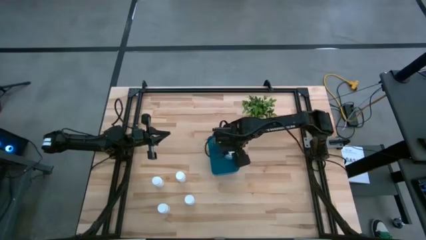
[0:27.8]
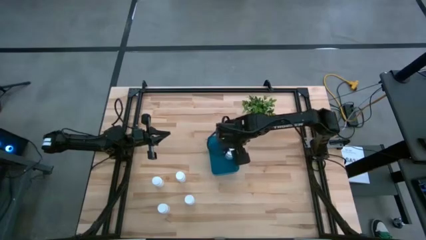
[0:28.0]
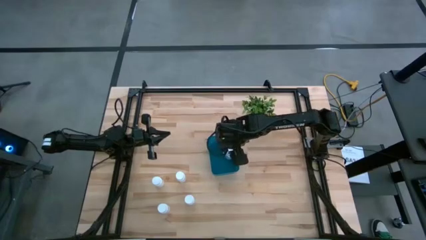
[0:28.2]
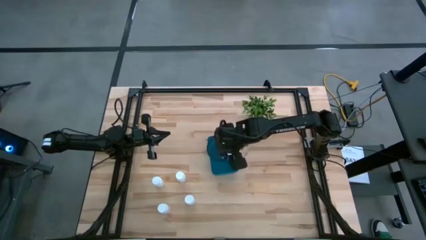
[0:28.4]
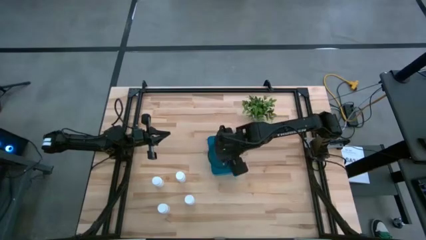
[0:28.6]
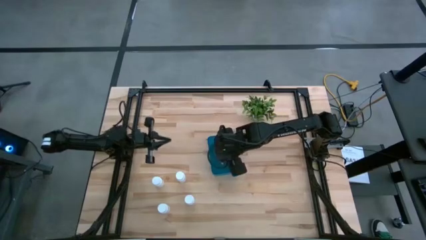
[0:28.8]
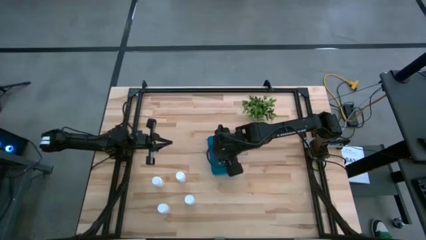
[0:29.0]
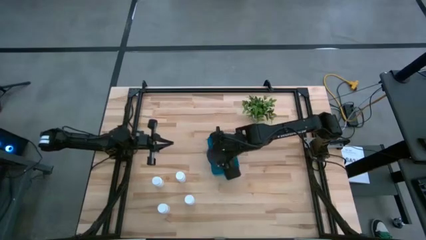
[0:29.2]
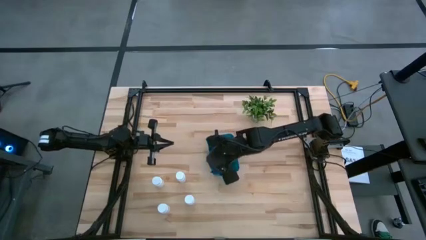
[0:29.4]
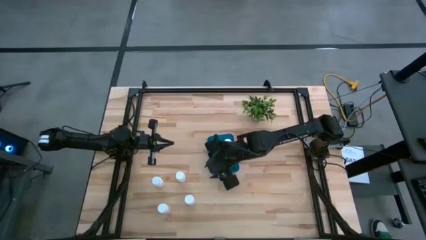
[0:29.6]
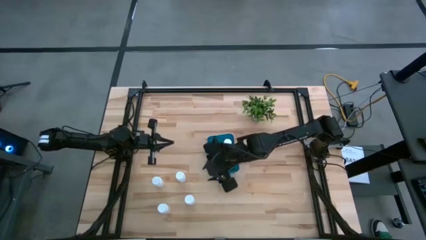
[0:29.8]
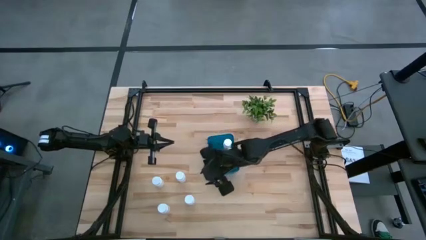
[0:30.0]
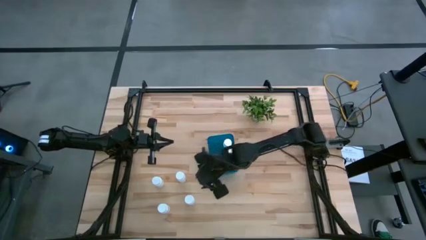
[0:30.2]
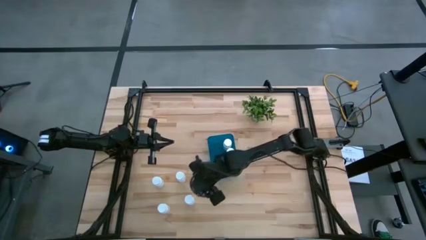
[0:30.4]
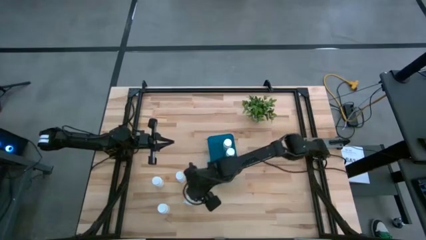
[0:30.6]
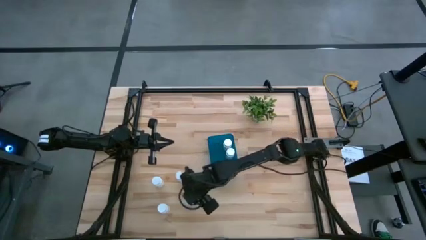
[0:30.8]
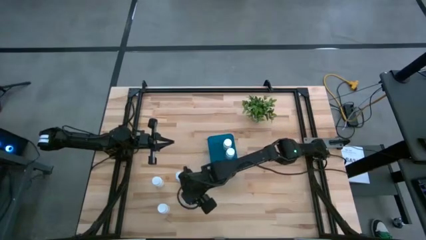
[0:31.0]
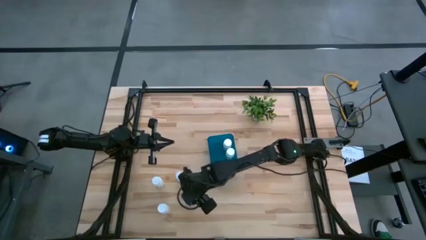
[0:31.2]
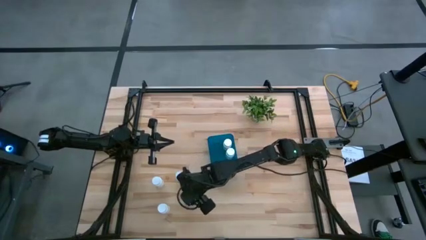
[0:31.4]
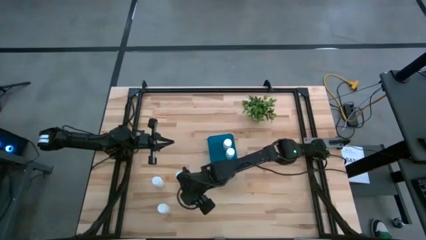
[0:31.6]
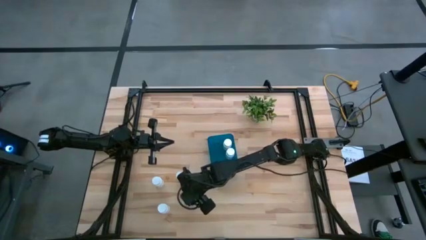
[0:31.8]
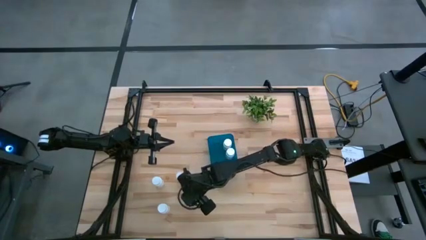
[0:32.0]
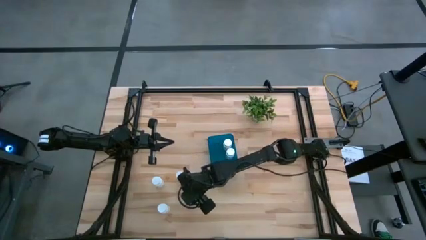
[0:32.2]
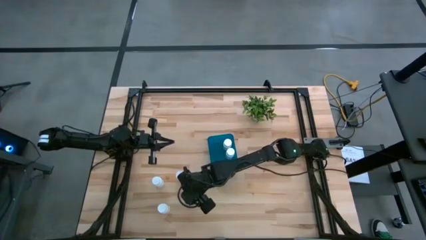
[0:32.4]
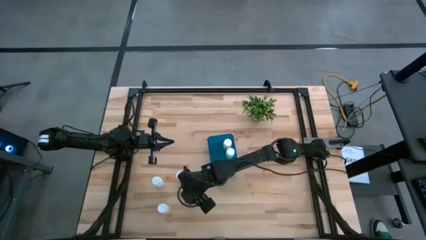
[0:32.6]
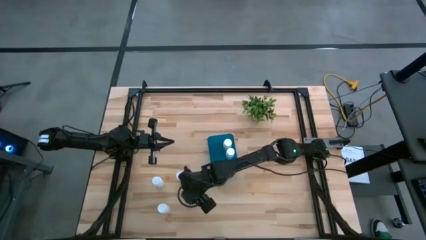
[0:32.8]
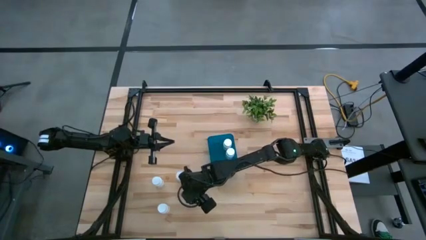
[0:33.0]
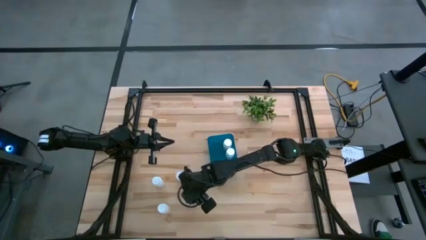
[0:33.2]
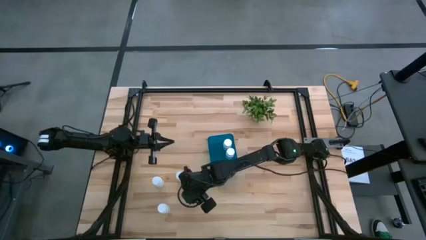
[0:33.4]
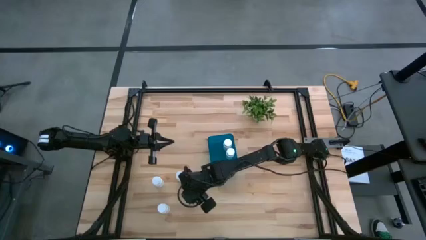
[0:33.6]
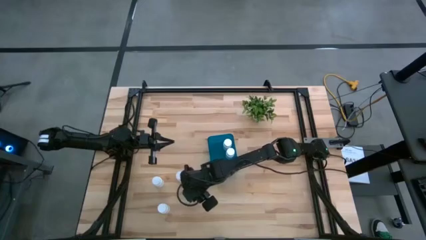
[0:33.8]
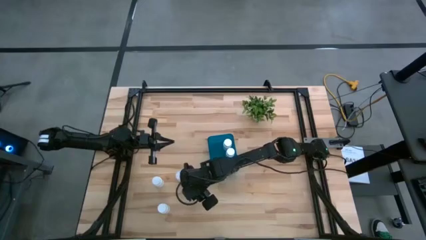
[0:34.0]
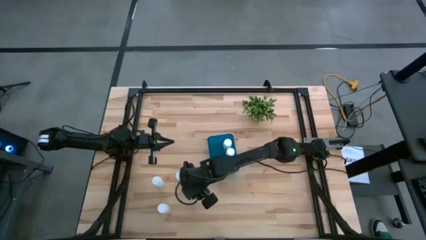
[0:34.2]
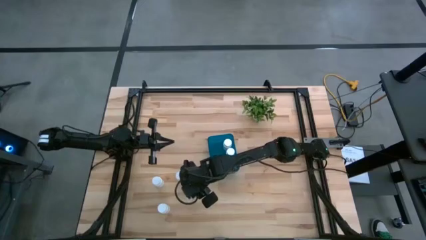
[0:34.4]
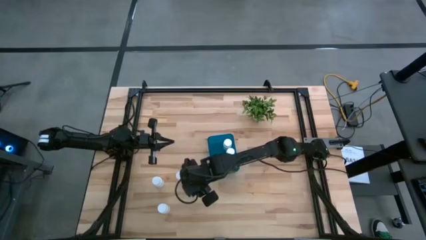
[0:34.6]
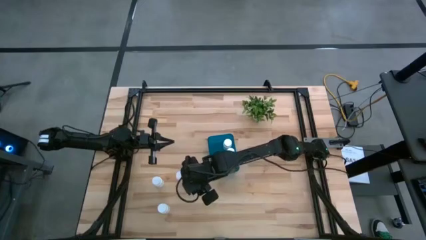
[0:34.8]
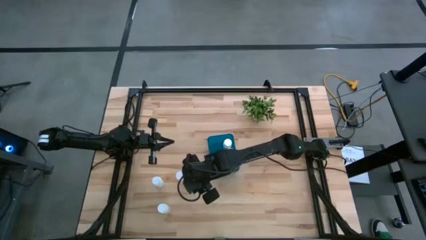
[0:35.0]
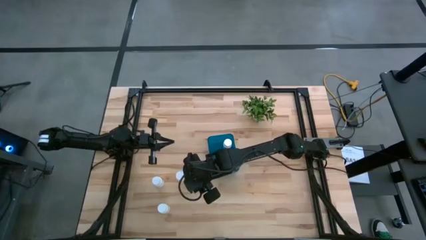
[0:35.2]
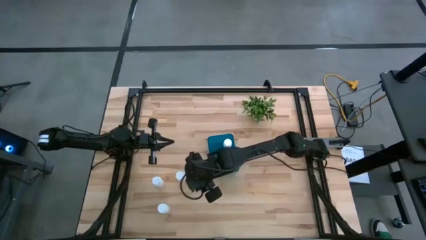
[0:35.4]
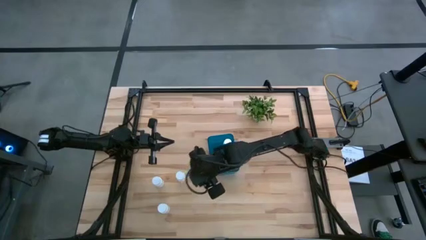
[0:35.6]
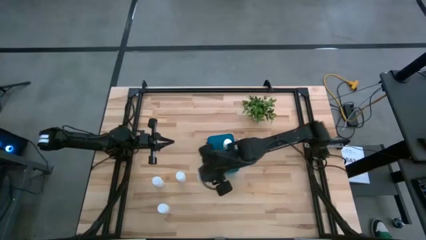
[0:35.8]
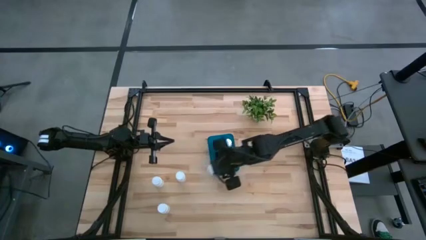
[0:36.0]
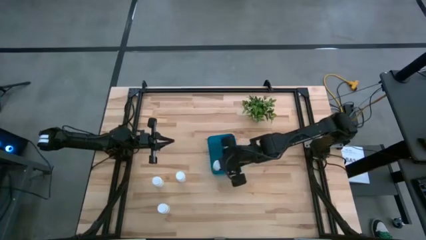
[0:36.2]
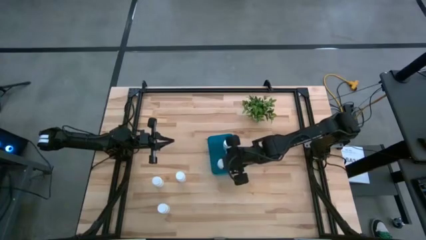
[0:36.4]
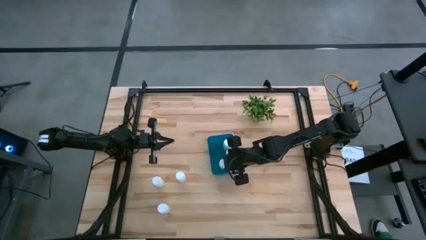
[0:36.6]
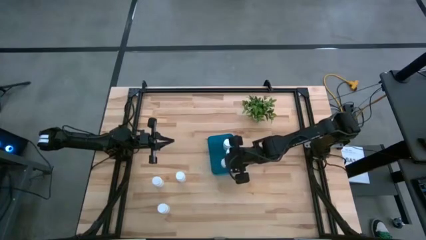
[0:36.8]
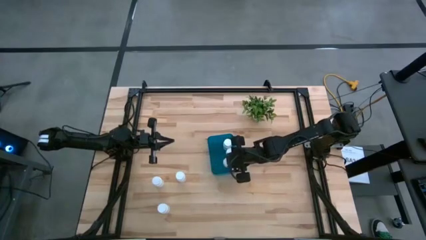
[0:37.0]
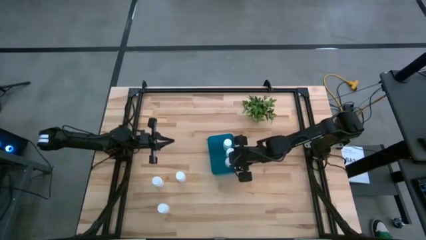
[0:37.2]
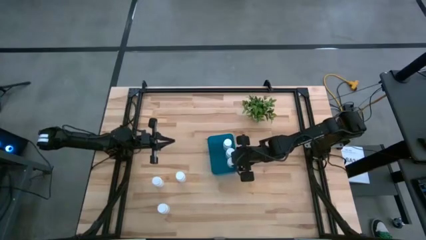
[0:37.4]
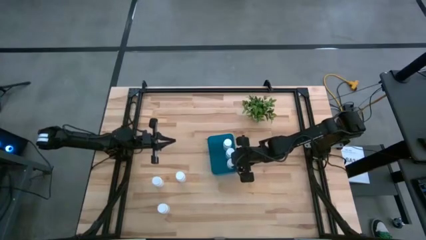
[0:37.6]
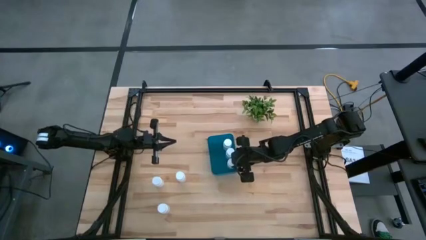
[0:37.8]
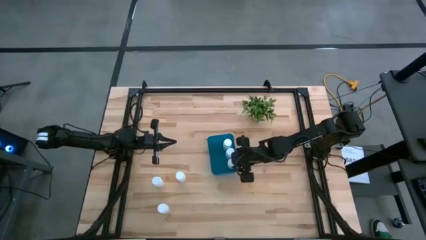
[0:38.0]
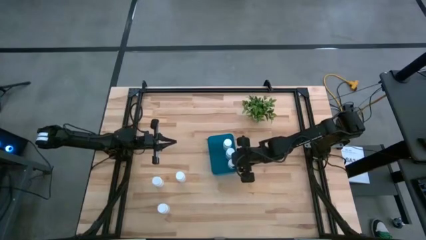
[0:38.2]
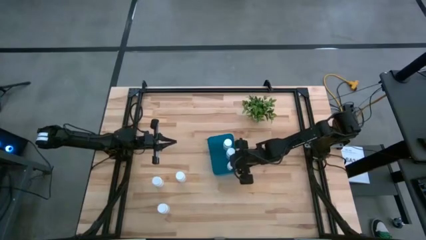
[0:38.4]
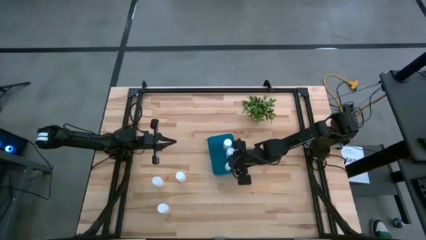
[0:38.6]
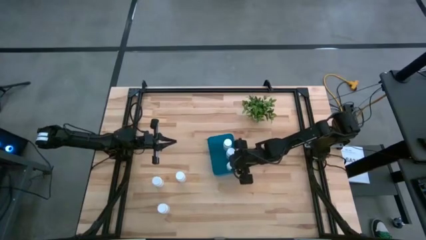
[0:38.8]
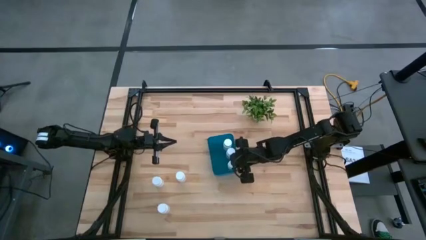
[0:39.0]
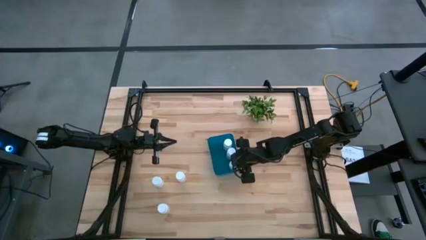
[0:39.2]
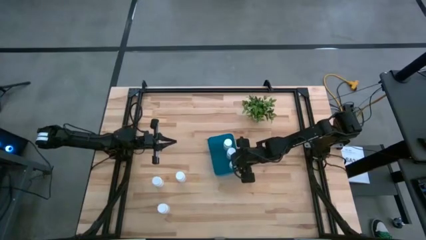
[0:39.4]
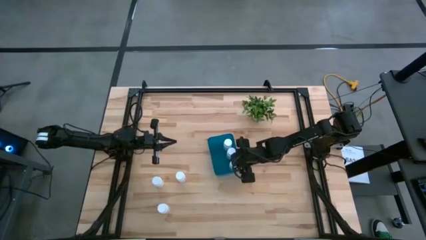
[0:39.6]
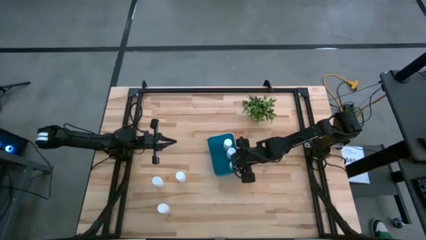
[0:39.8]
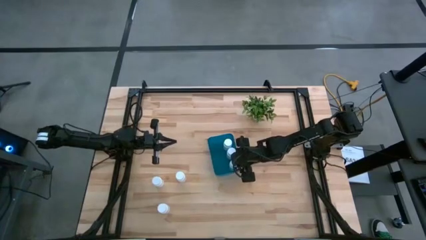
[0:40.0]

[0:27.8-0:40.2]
Task: Pick and place pill bottles into a basket
Put the white pill bottle into the blue bin

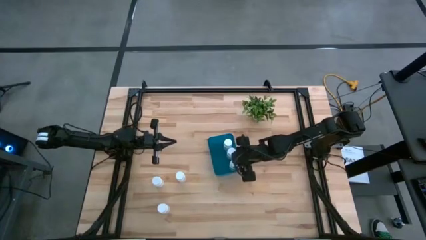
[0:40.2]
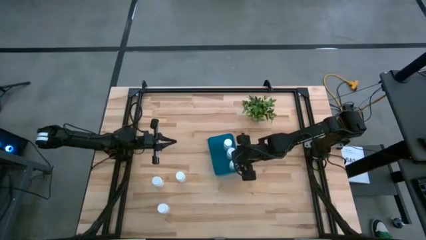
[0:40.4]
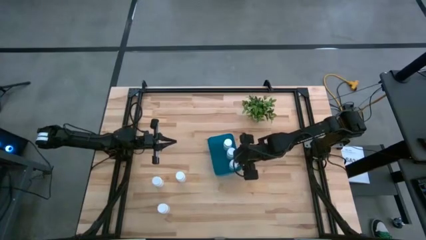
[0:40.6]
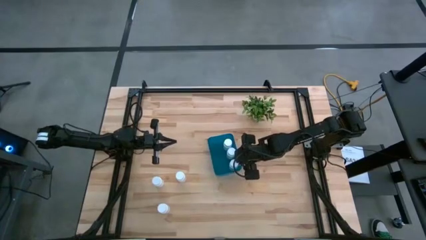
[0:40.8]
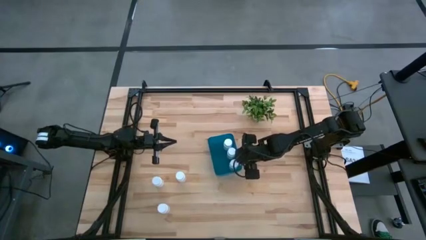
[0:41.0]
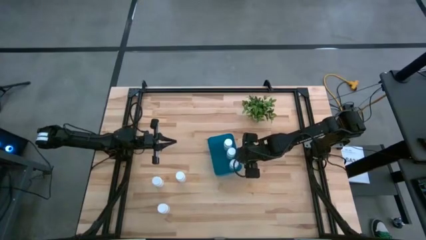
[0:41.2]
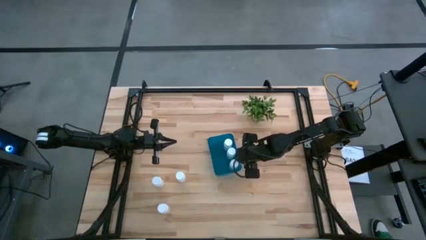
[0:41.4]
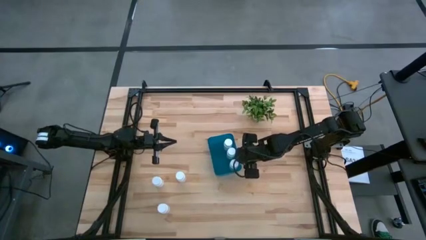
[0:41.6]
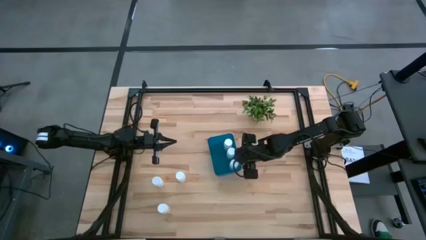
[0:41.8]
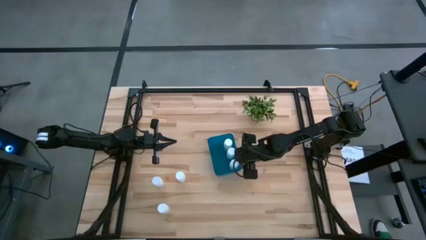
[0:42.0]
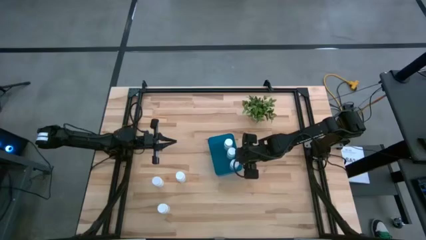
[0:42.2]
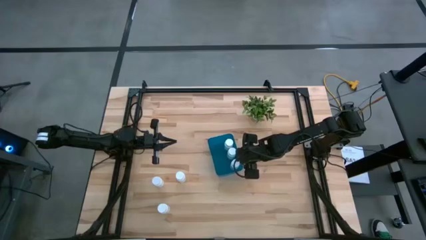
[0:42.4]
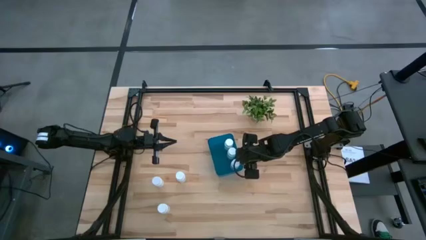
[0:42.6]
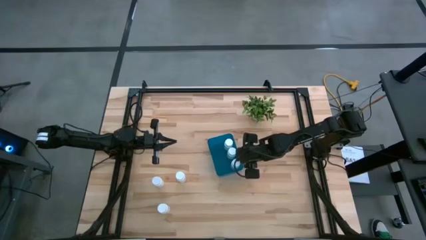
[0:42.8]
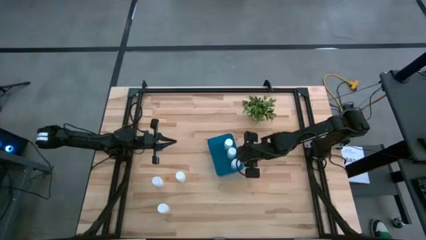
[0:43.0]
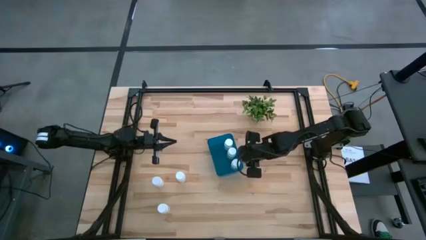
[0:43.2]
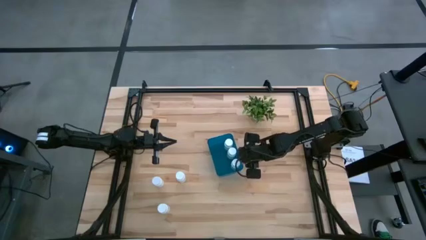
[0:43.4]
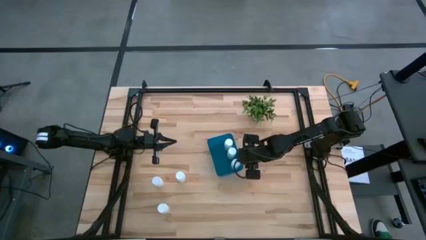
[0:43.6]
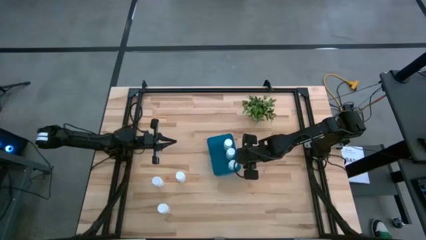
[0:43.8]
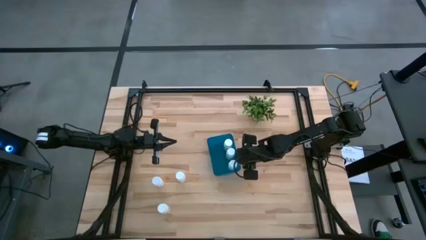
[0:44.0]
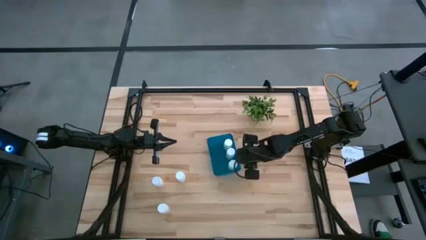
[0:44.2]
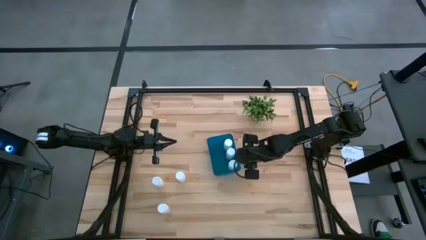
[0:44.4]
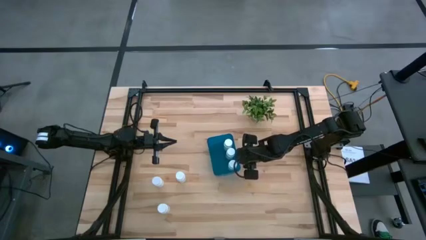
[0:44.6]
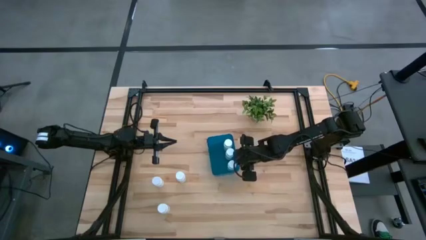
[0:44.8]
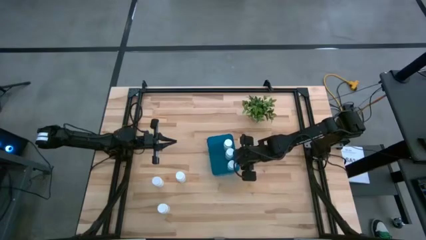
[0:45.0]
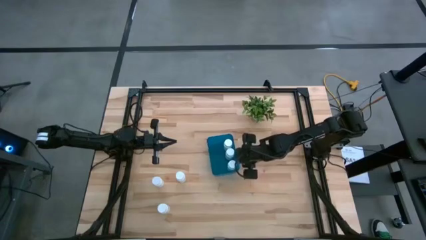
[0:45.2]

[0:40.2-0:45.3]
Adjust the blue bin
